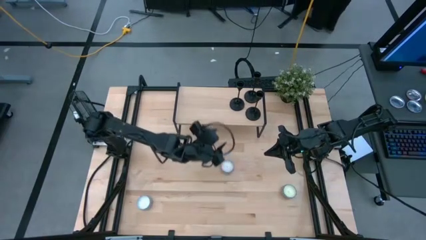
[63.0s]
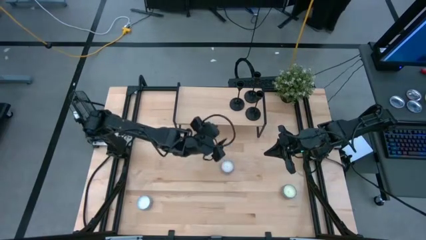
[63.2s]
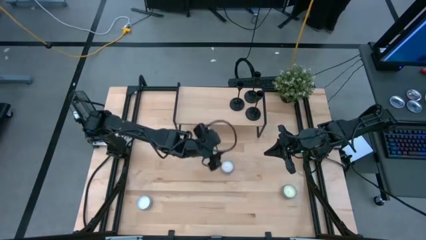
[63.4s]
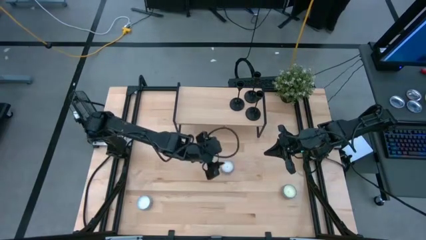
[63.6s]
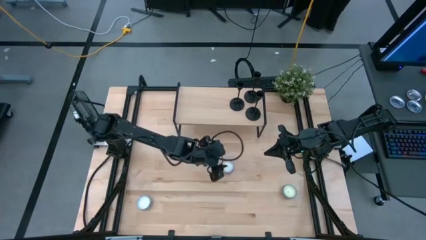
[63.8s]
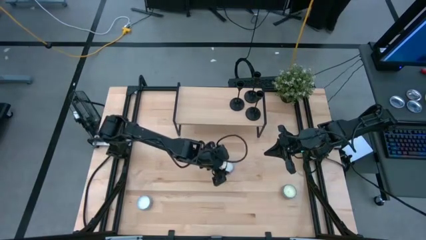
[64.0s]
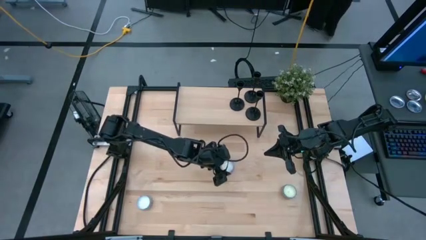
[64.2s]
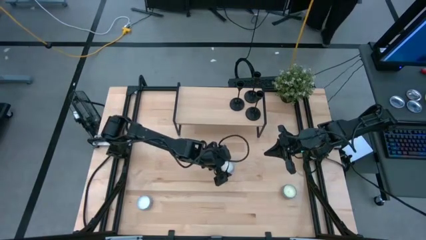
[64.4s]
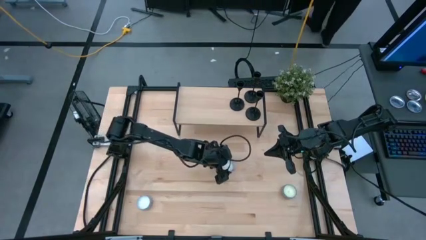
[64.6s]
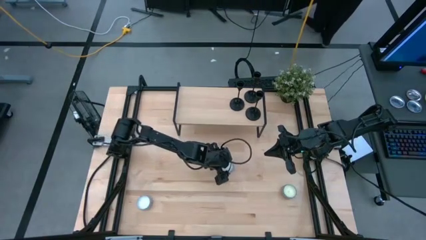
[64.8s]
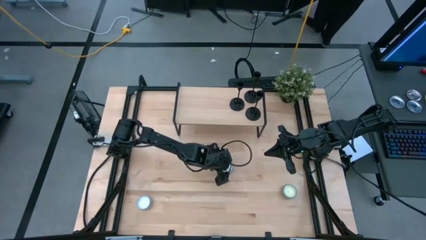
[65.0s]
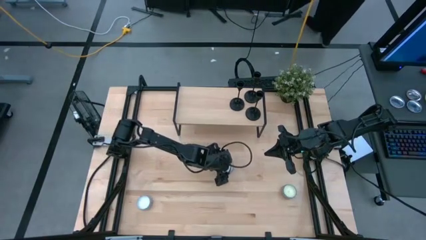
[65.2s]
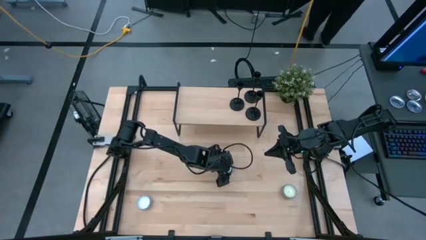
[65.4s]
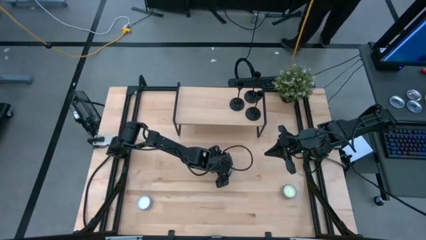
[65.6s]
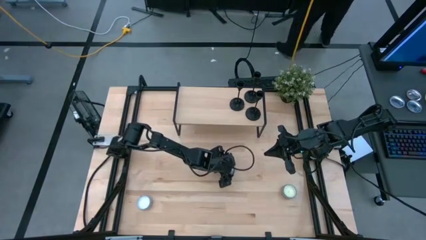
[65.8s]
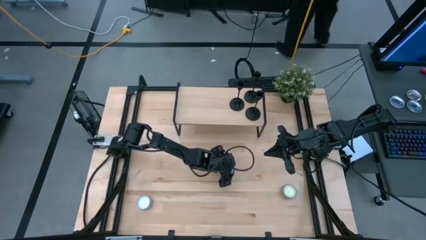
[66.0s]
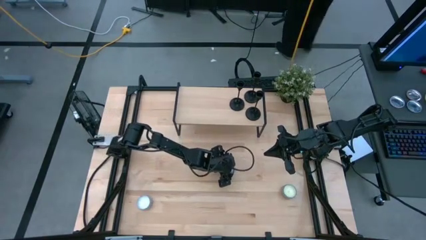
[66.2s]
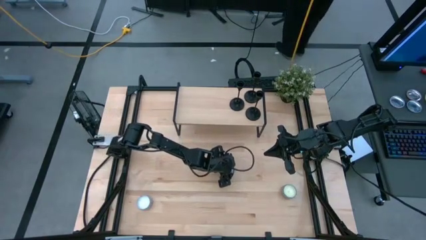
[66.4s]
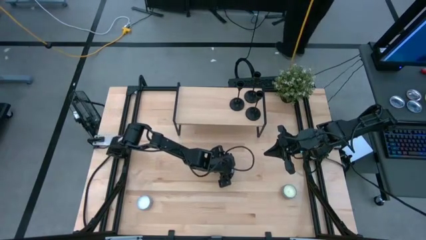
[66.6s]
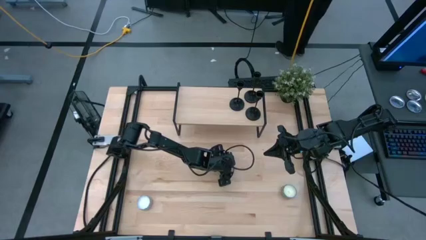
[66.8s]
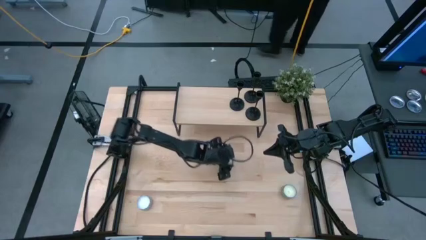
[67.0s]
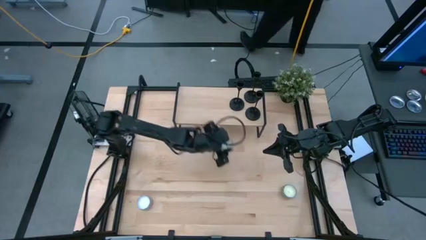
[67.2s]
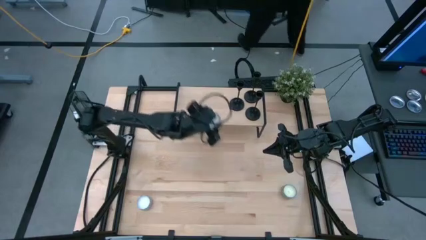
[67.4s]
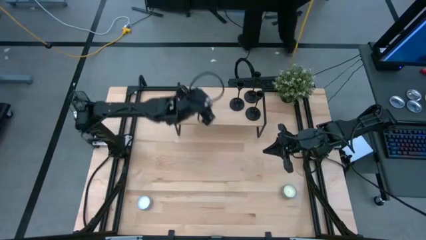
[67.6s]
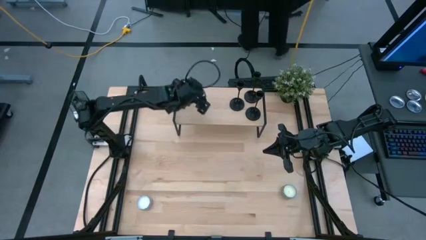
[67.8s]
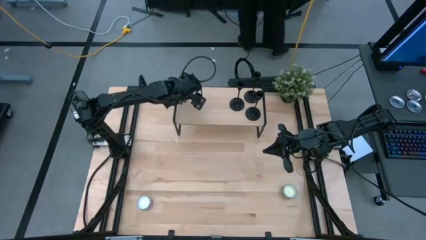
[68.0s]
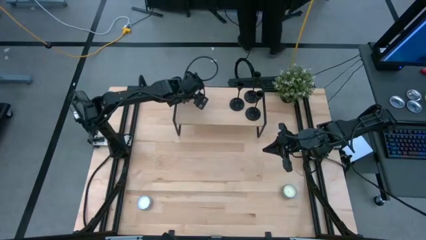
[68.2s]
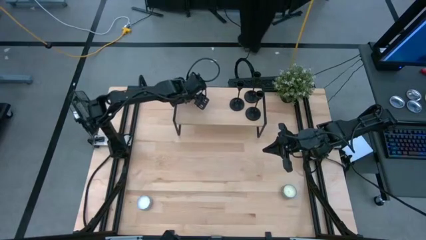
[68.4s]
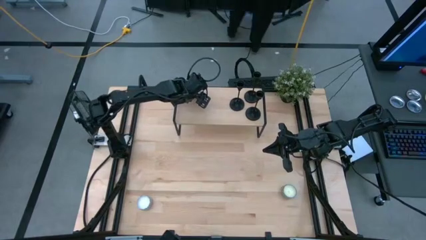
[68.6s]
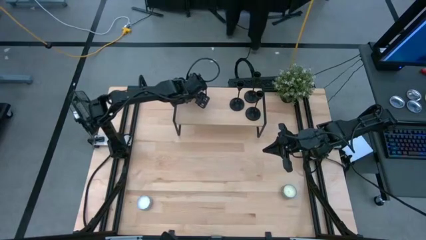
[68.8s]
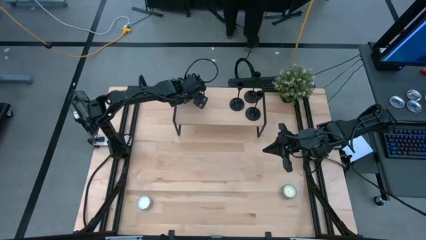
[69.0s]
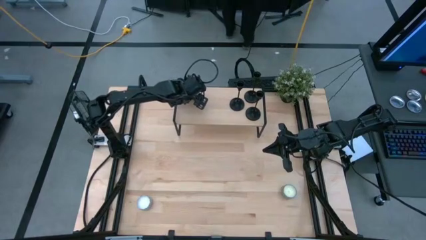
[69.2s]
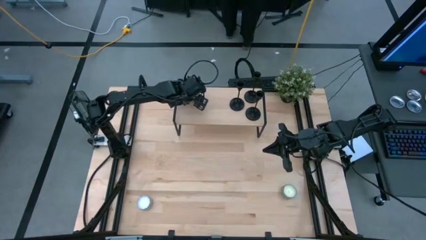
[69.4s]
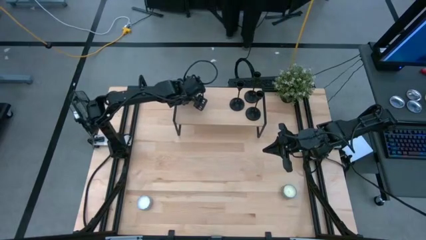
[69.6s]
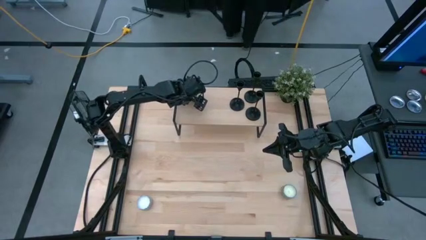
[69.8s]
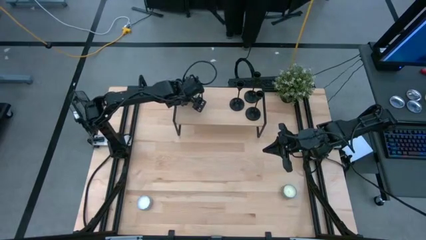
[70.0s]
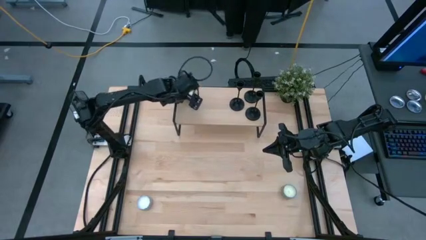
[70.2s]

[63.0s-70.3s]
Task: Pick & Place candle stick holders
Put the red scented candle on the shelf

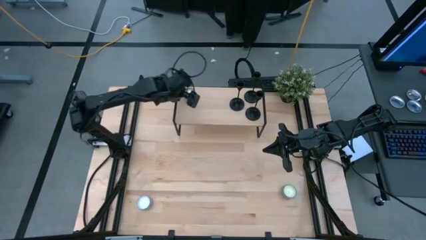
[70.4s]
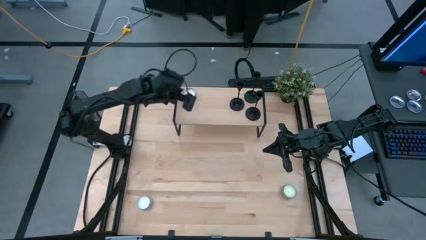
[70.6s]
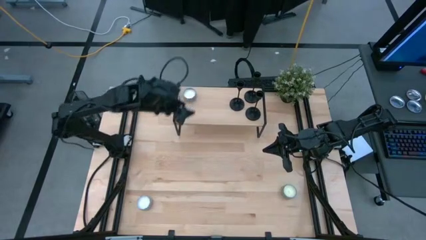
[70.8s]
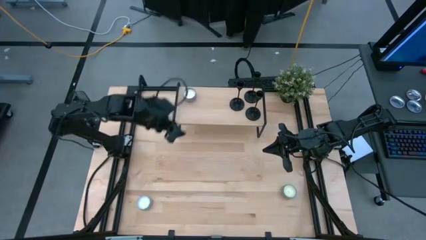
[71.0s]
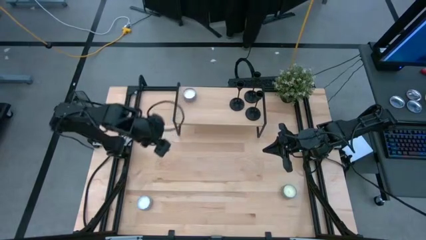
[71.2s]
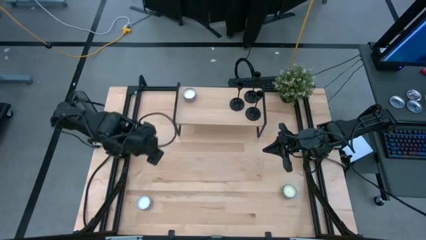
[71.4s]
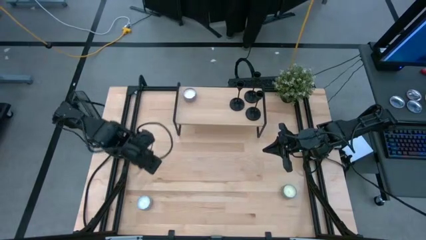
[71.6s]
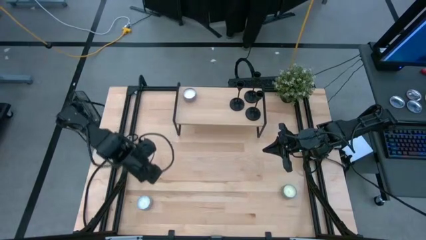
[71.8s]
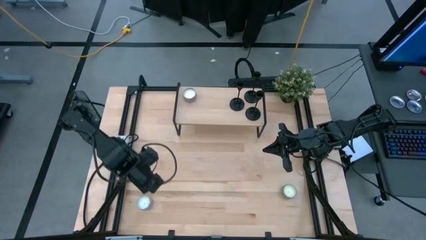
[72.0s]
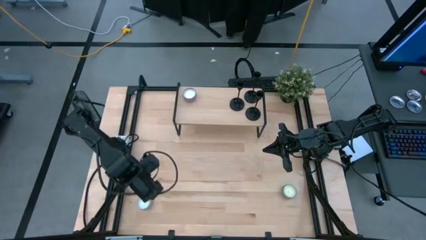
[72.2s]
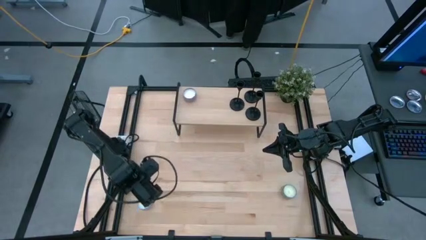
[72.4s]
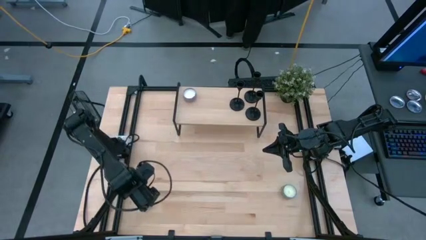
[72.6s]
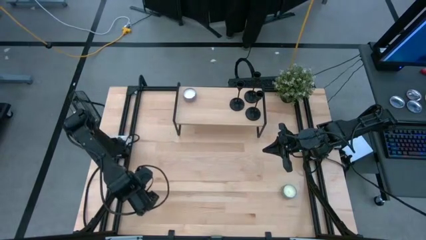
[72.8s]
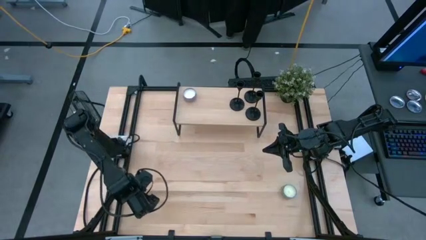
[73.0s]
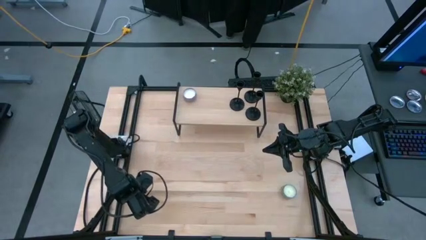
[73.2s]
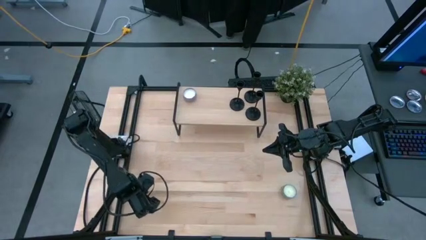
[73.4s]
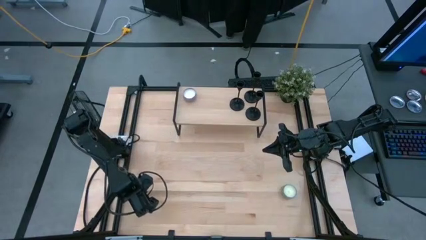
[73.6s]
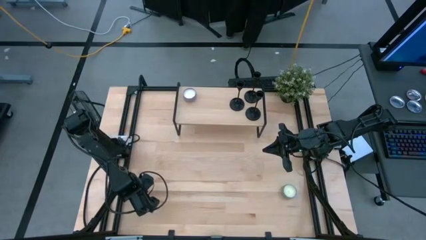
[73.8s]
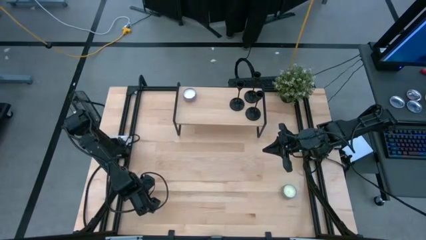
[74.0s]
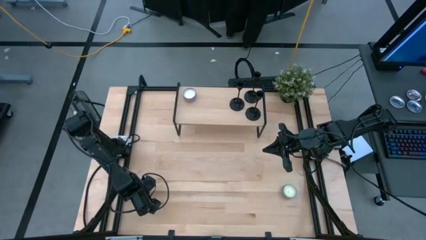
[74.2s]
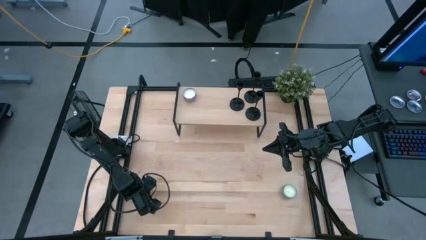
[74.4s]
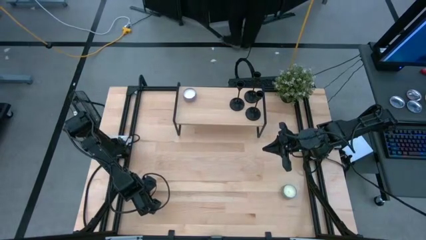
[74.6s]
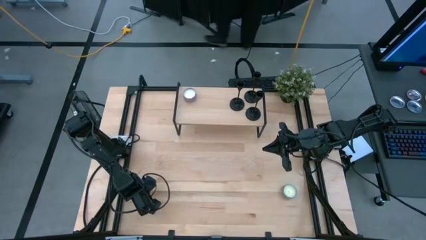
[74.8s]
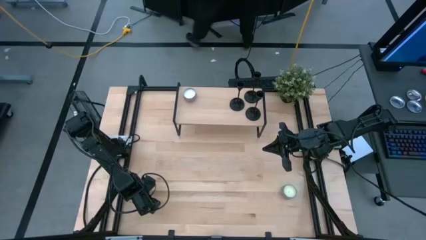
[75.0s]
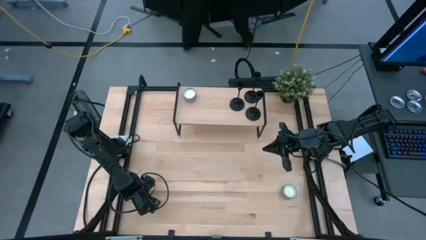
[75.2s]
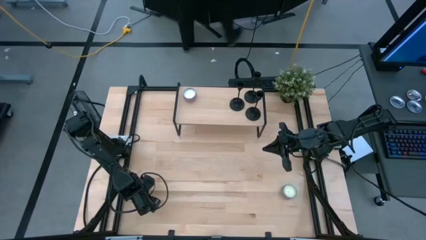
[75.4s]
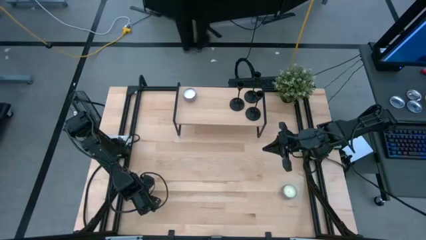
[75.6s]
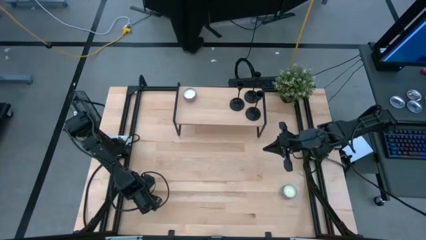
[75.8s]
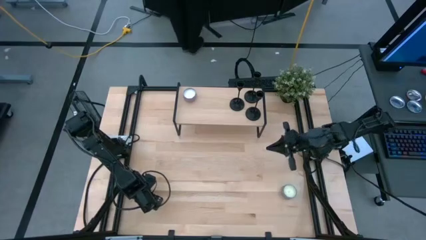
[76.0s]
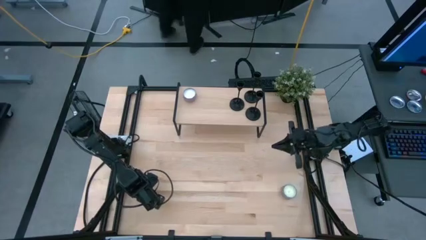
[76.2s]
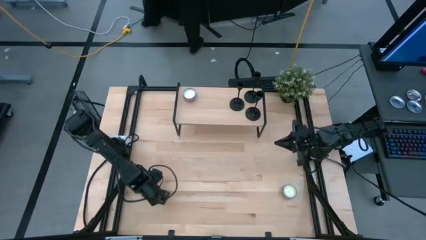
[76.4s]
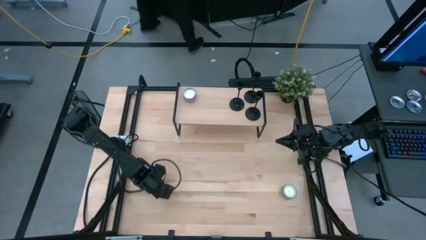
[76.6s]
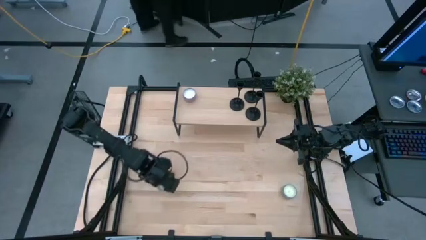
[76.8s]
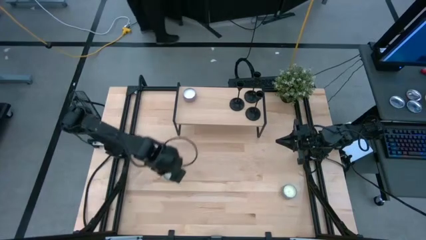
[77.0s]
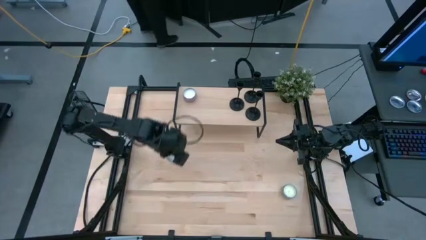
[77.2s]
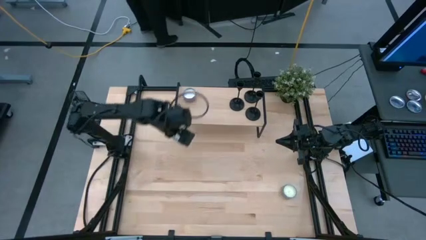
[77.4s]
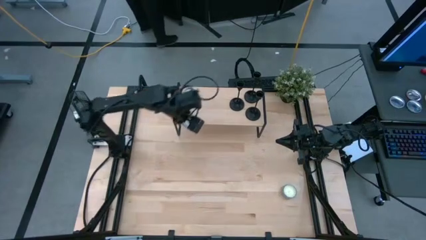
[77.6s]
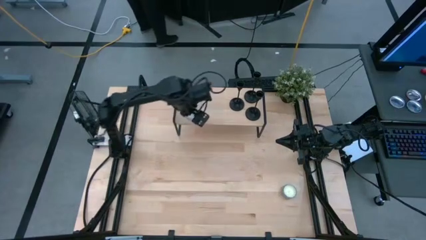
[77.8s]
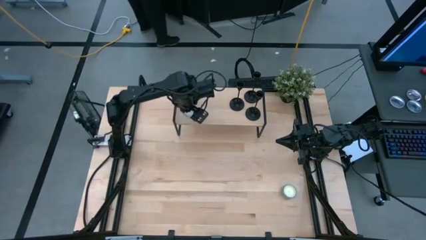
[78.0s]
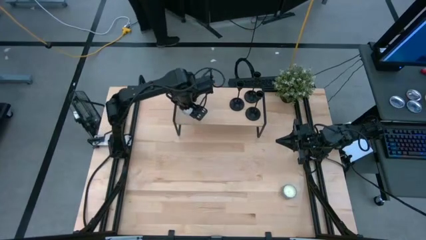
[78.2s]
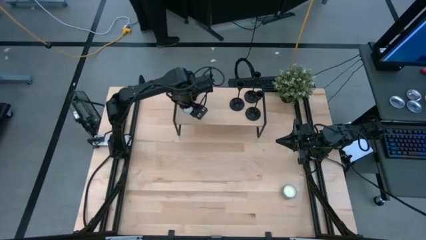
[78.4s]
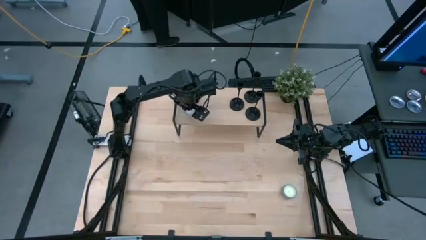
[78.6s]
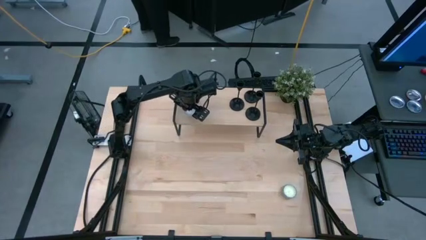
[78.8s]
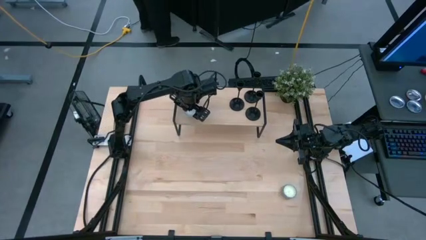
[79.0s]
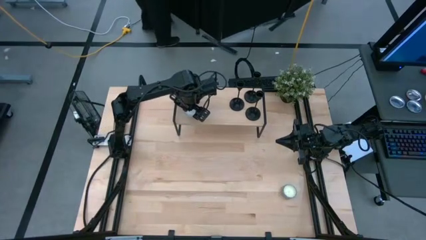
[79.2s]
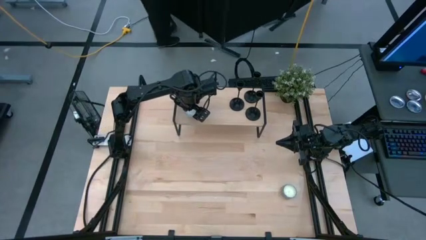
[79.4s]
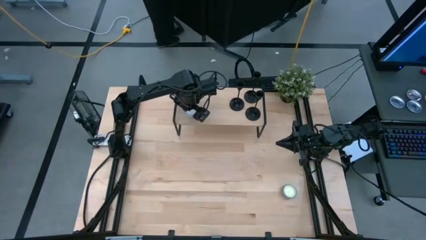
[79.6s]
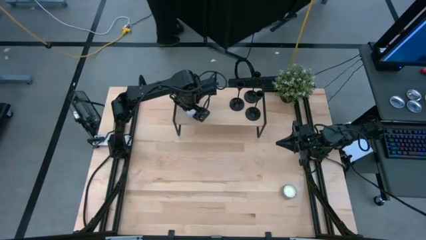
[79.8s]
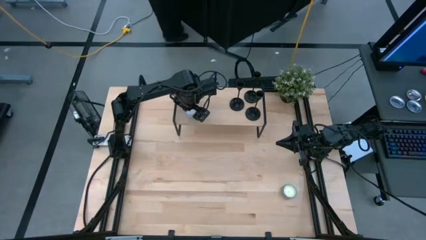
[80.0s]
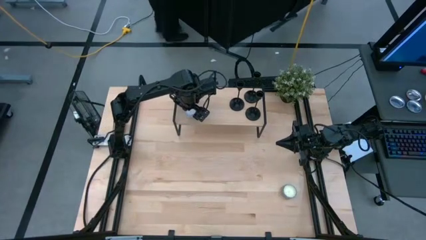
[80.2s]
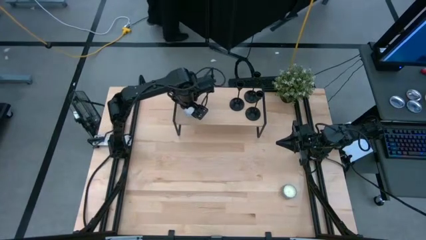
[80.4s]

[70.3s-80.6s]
Put the white scented candle on the shelf
